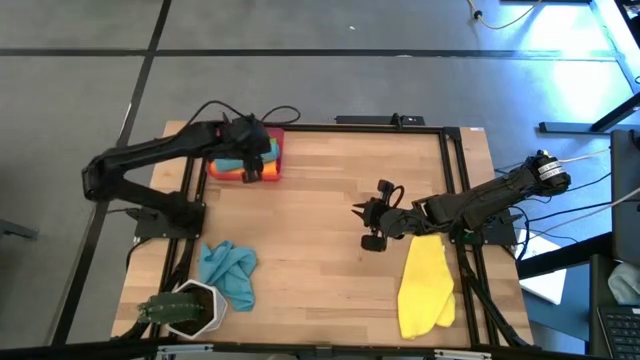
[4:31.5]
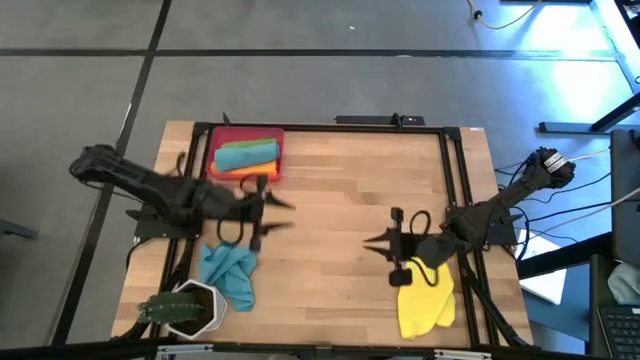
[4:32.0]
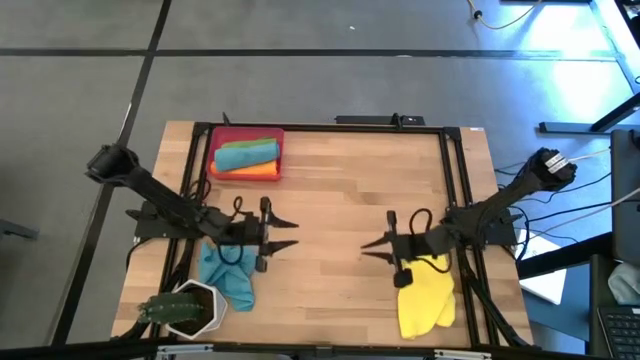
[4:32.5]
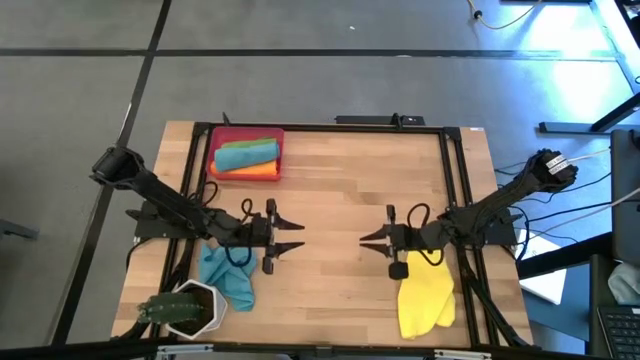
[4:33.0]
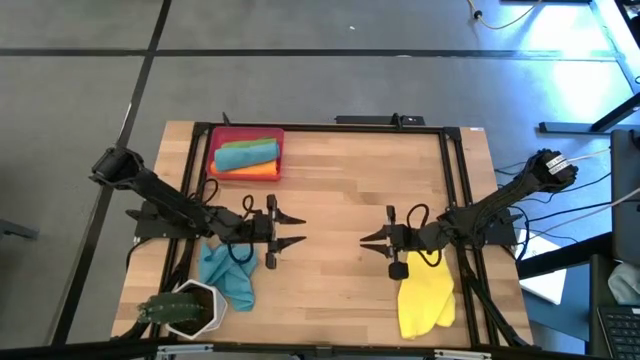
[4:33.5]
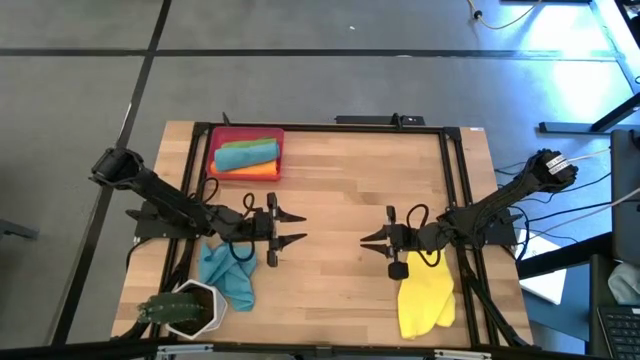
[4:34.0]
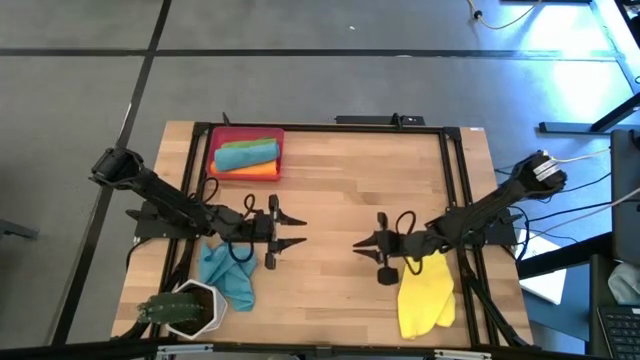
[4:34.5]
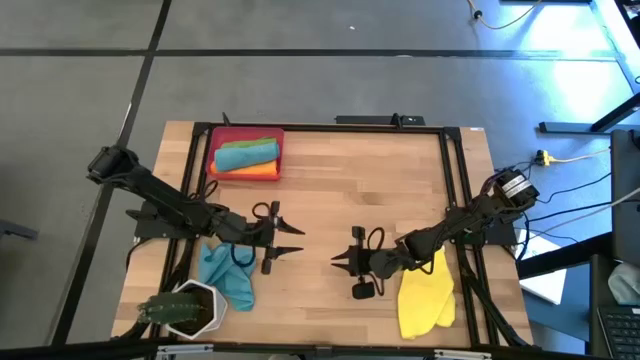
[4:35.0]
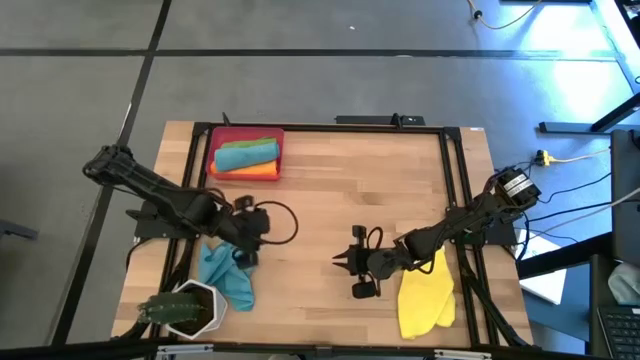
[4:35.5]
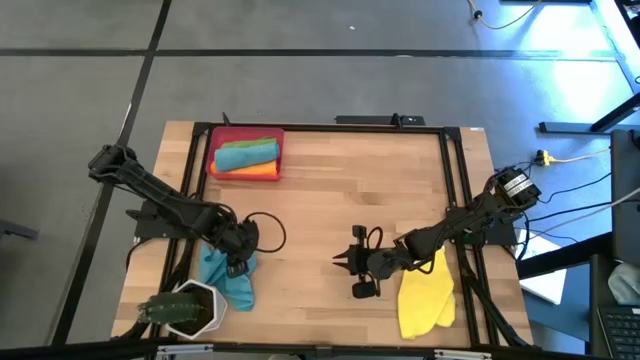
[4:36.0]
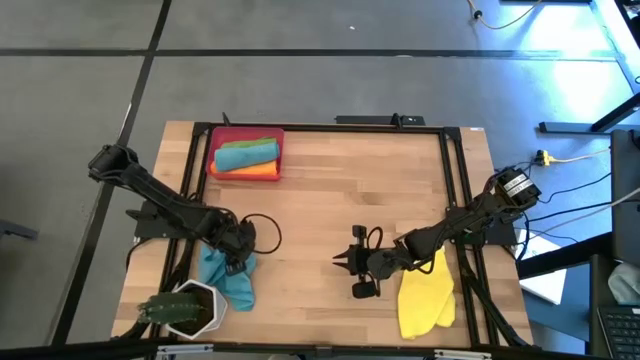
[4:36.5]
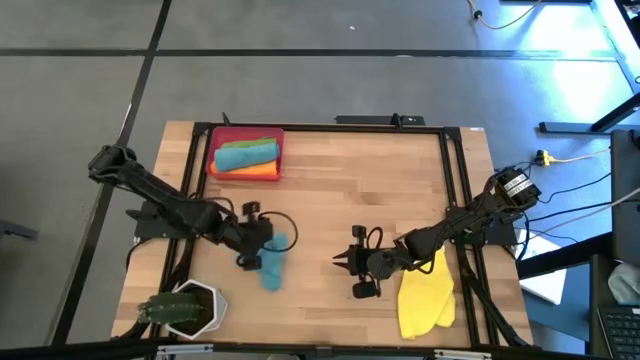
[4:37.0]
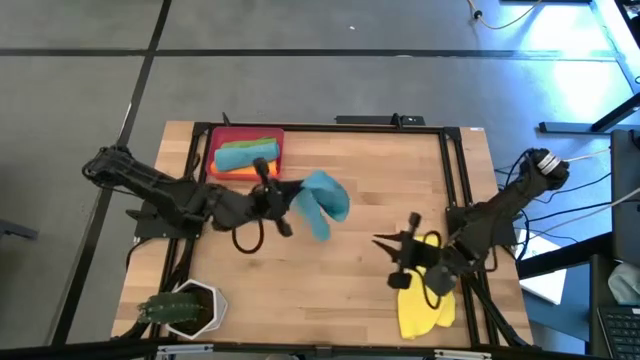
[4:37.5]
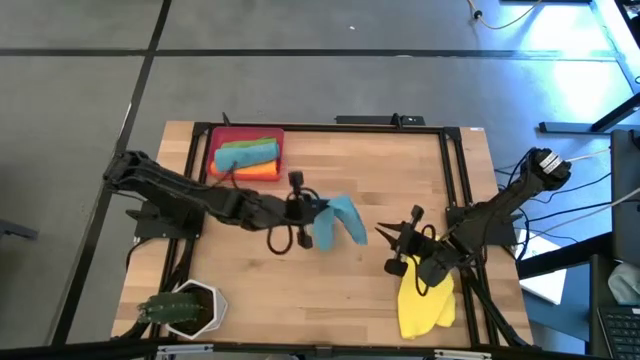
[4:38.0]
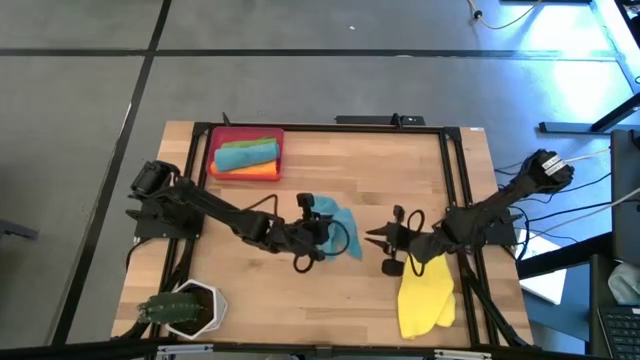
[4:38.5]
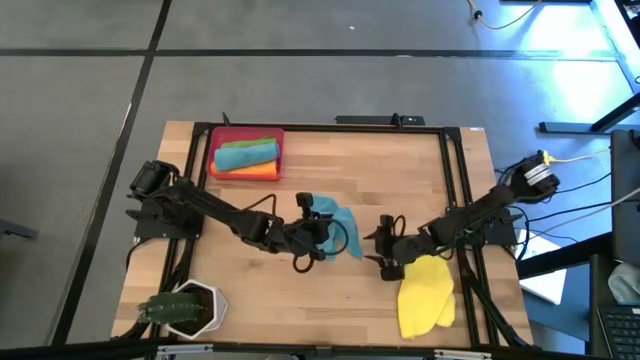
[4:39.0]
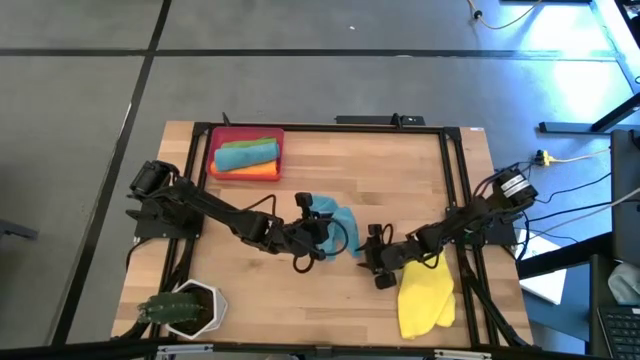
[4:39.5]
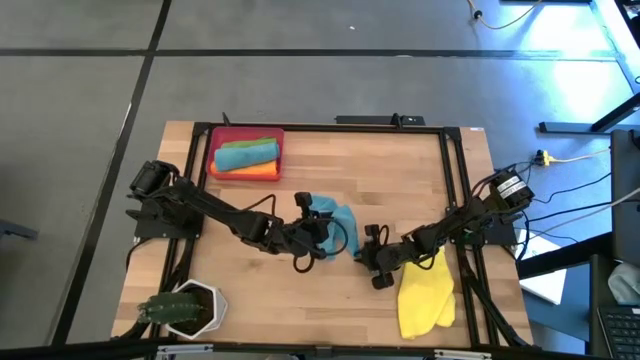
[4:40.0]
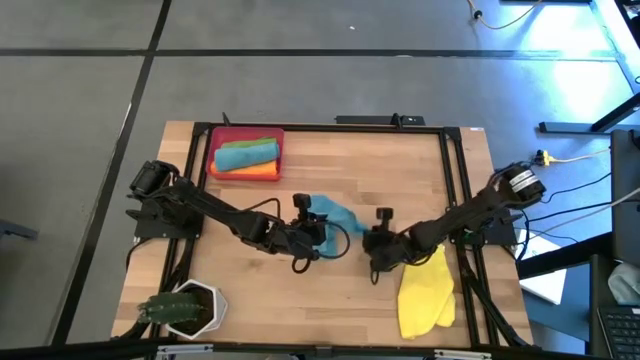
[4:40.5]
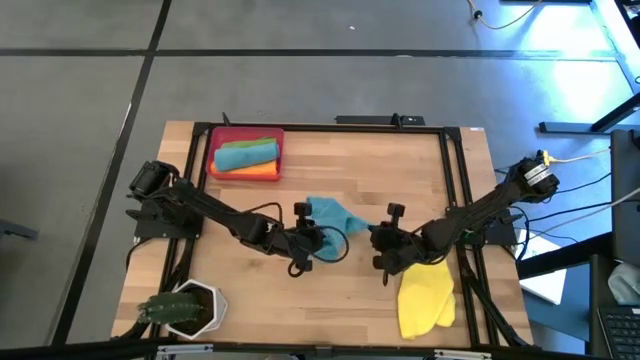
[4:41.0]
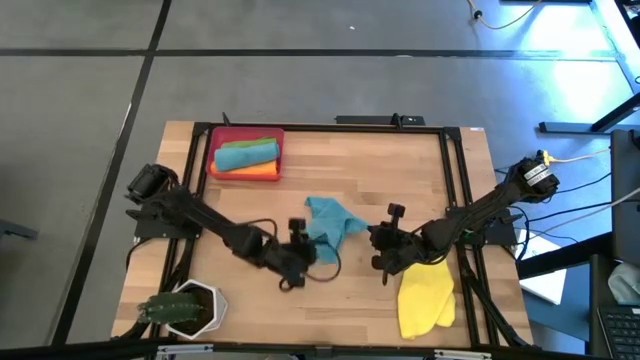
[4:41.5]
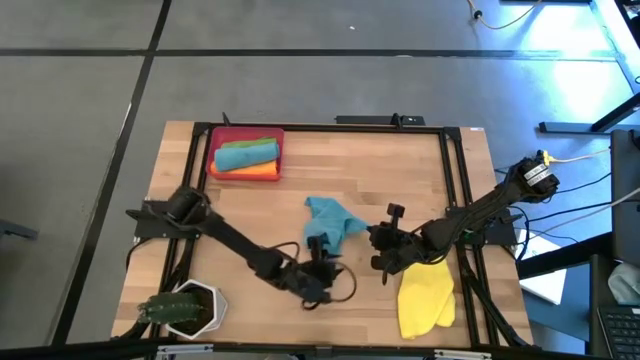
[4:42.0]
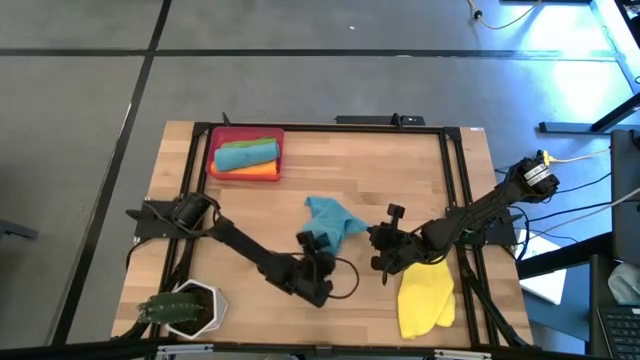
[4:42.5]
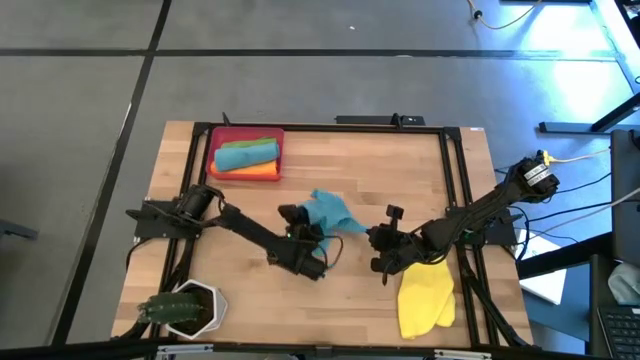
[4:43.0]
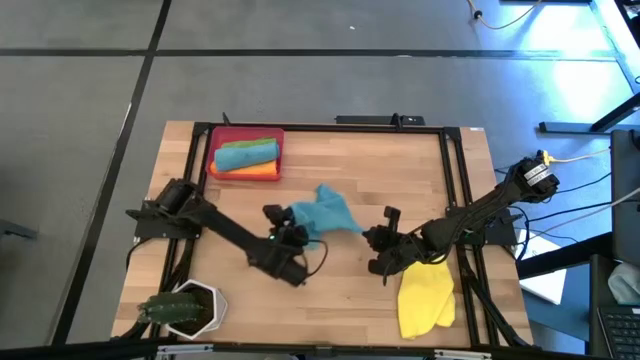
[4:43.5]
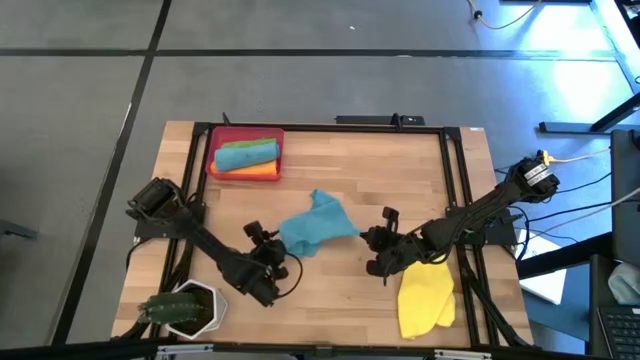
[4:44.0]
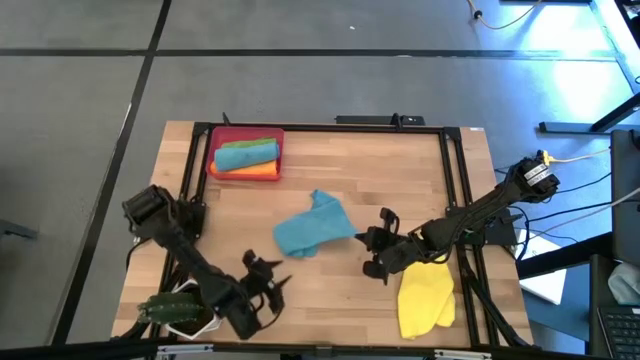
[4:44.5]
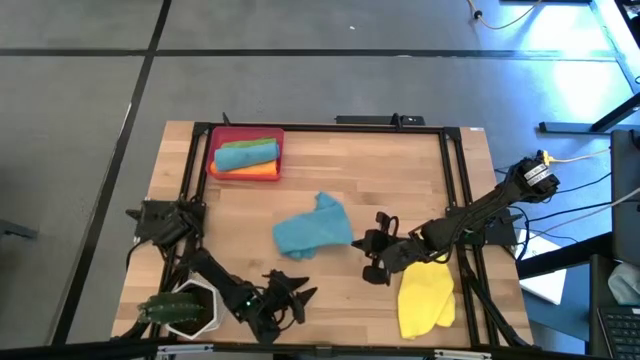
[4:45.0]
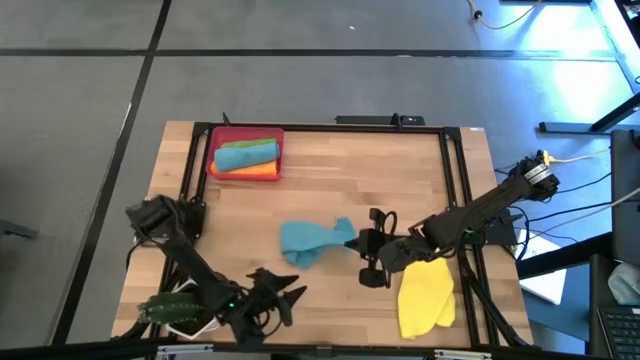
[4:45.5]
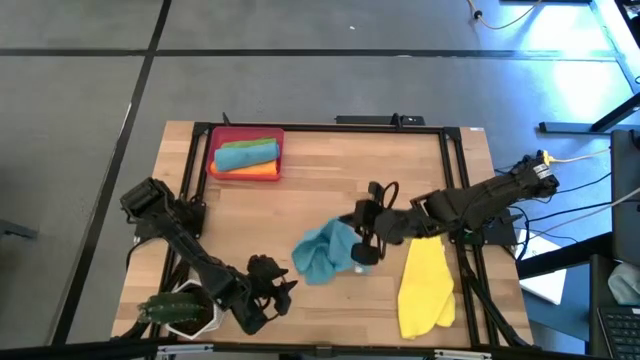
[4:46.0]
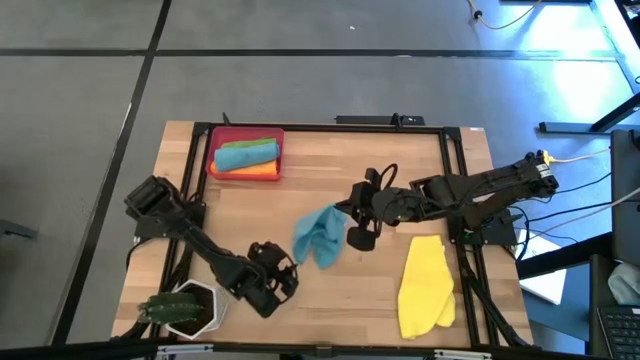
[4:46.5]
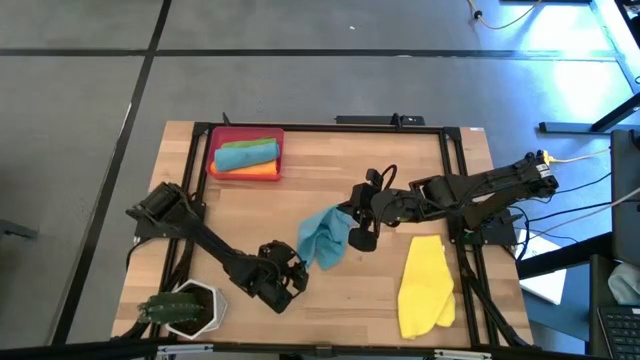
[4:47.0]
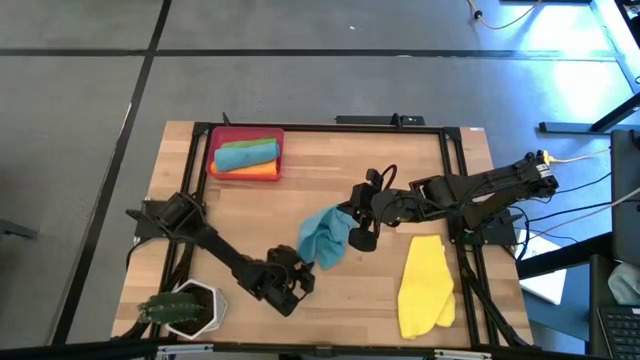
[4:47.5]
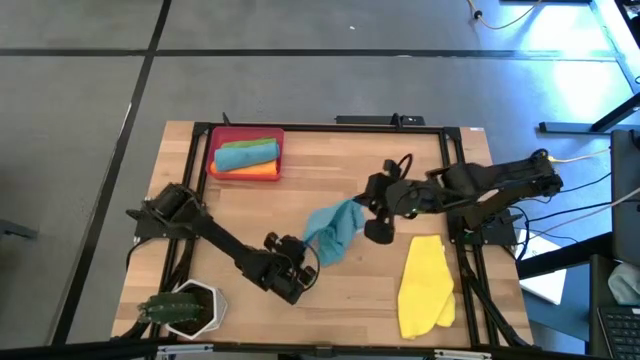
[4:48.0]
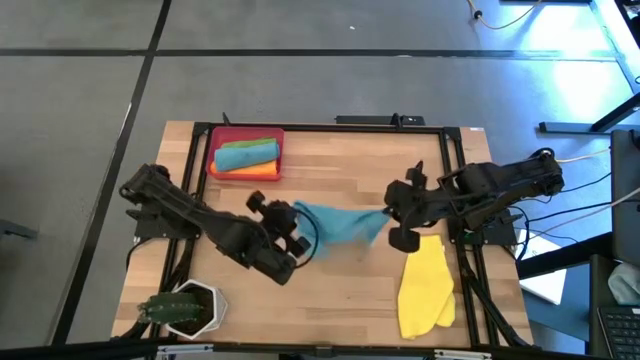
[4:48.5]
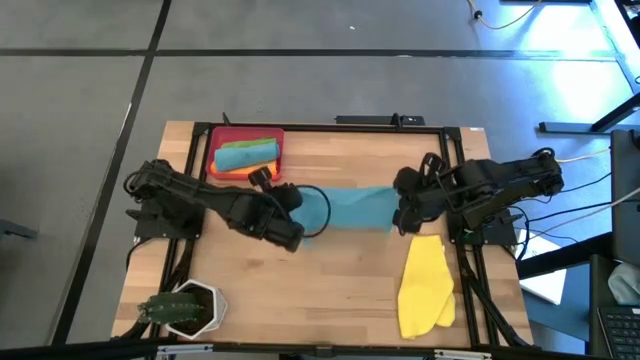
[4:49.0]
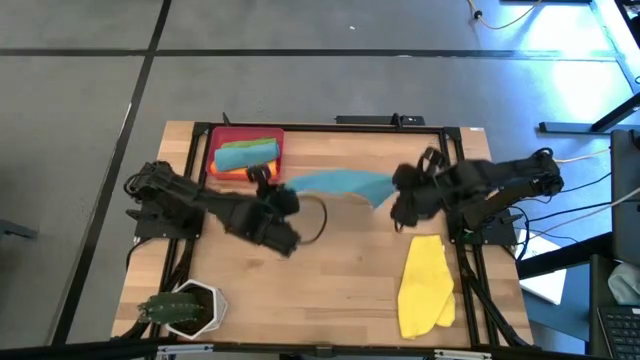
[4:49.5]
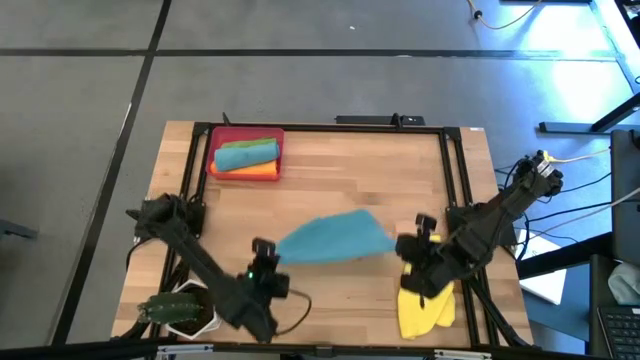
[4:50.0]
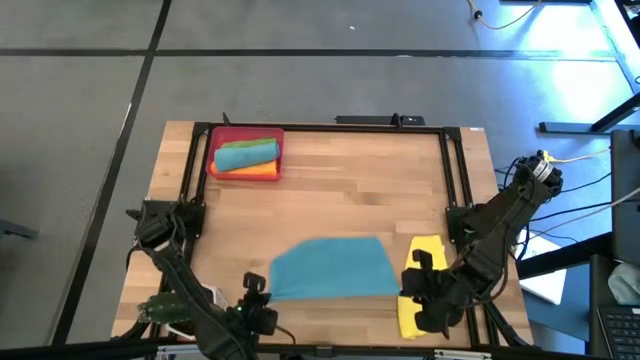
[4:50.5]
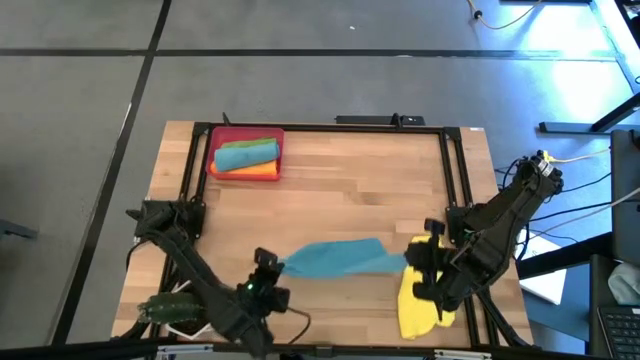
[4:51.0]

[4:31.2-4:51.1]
Task: Roll microfiber towels into tight, uniform cylinder then place into a basket
Fold the blue microfiber towel

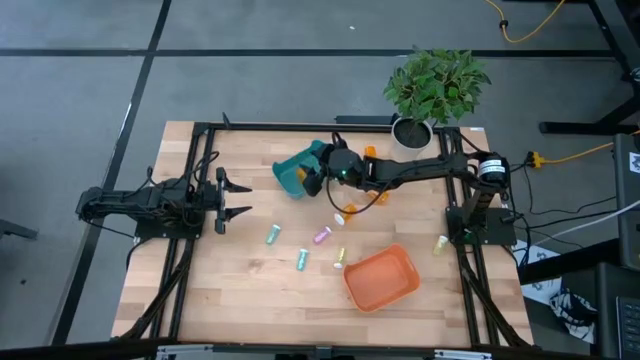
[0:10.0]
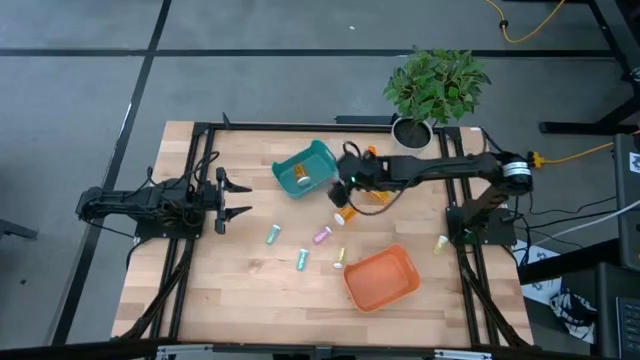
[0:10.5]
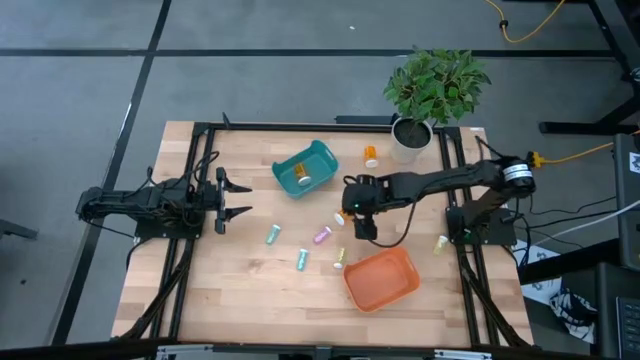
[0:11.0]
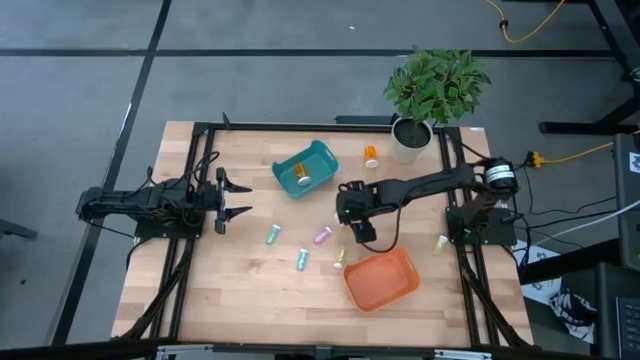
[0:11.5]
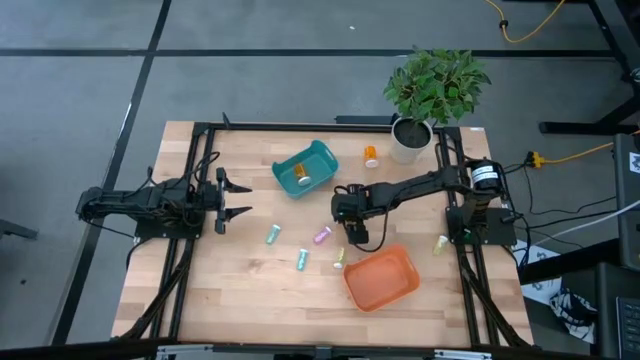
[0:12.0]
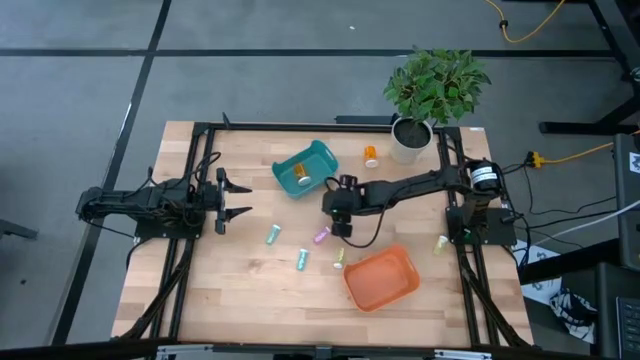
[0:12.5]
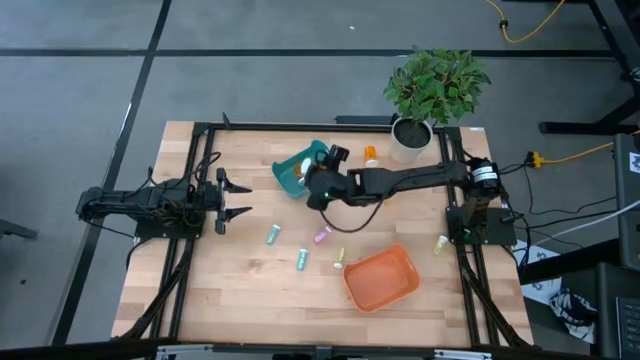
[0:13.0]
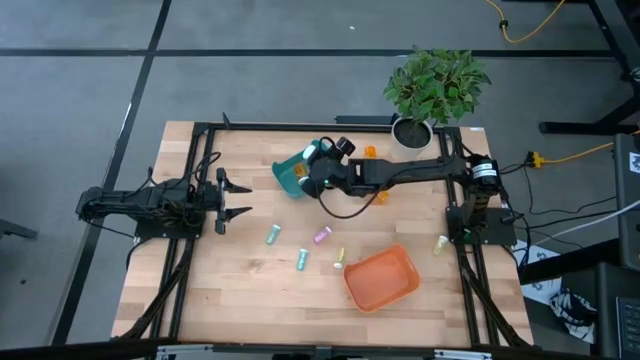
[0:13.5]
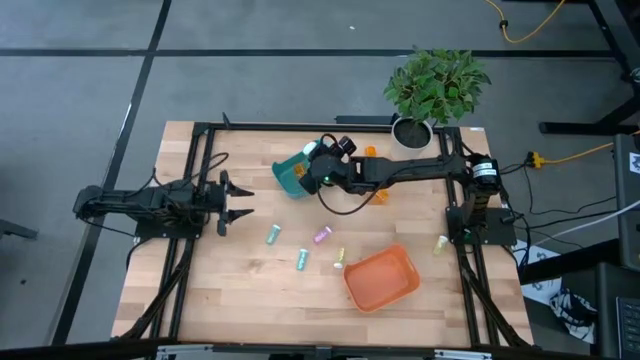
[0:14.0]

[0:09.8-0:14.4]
Task: Pick and place medicine bottles into bin by pill shape (circle, oval)
Put the bottom left big orange pill bottle into the light blue bin
